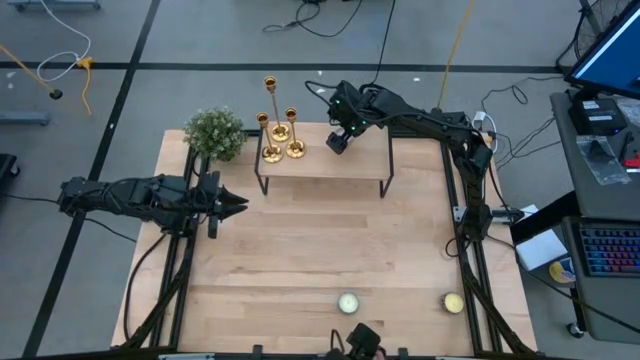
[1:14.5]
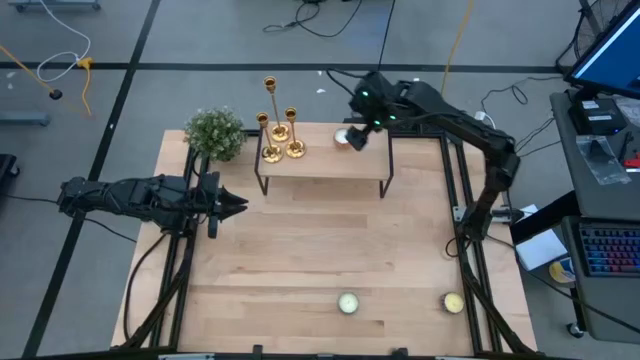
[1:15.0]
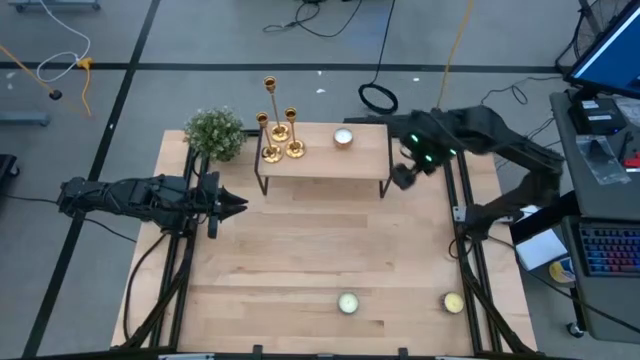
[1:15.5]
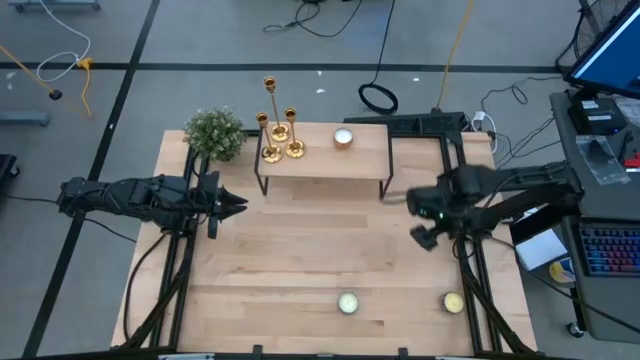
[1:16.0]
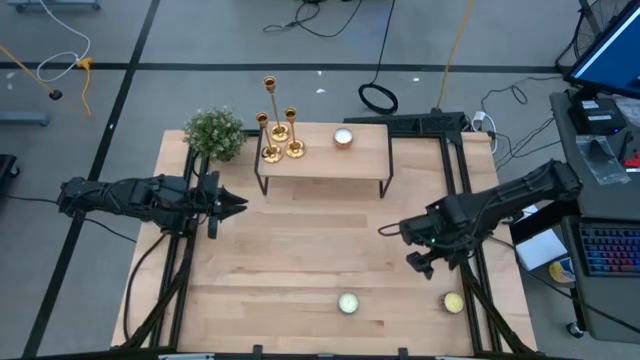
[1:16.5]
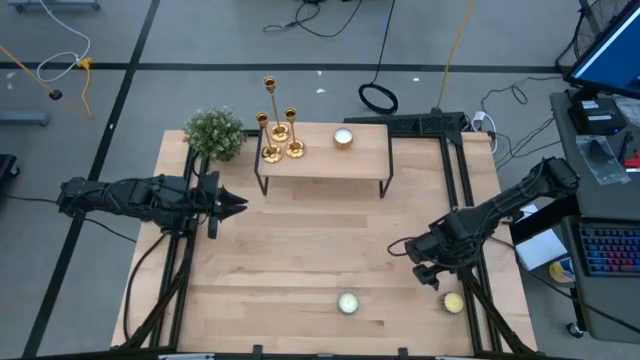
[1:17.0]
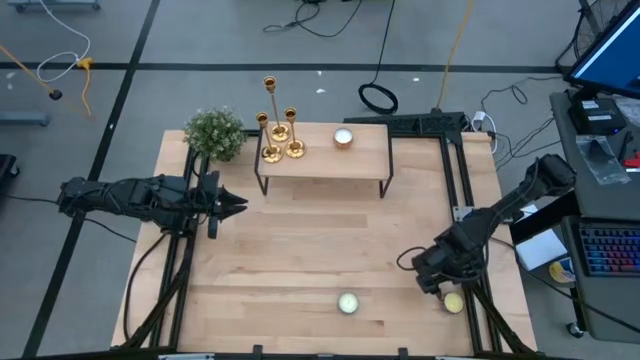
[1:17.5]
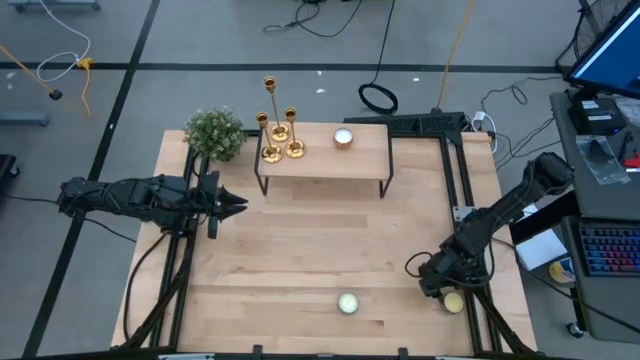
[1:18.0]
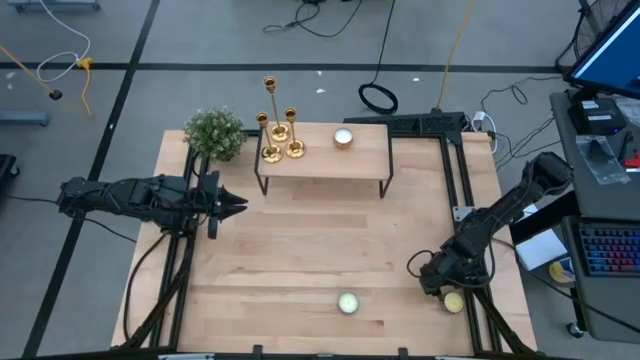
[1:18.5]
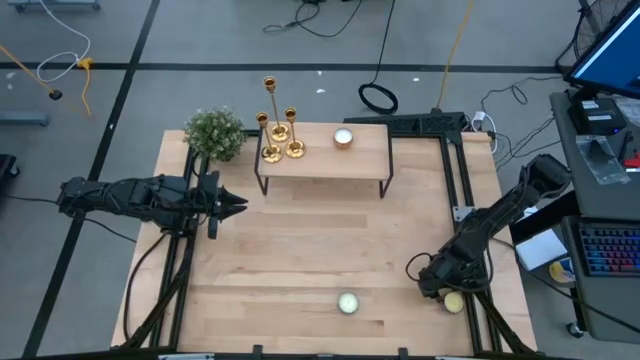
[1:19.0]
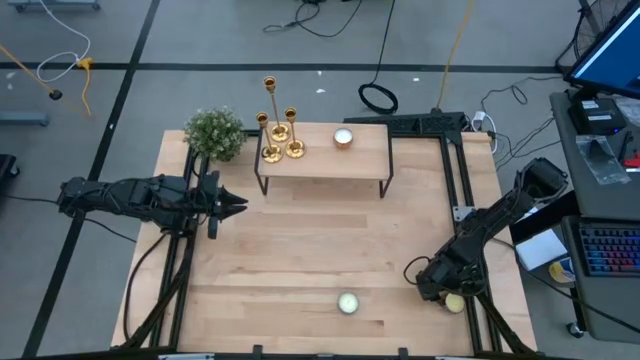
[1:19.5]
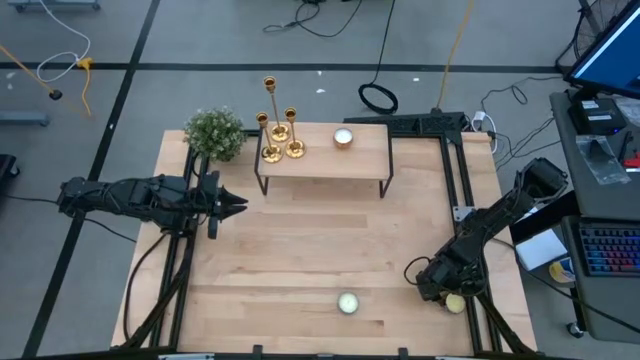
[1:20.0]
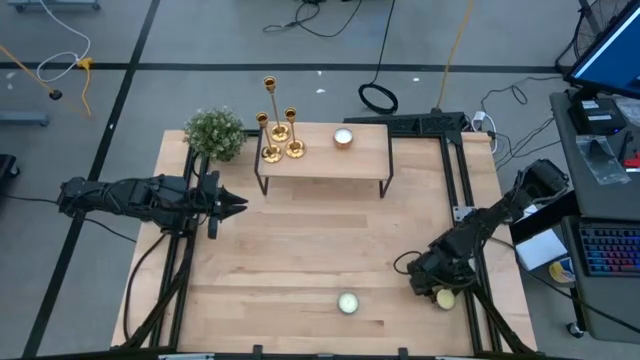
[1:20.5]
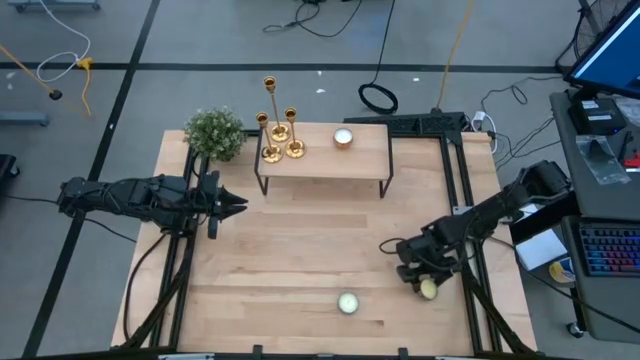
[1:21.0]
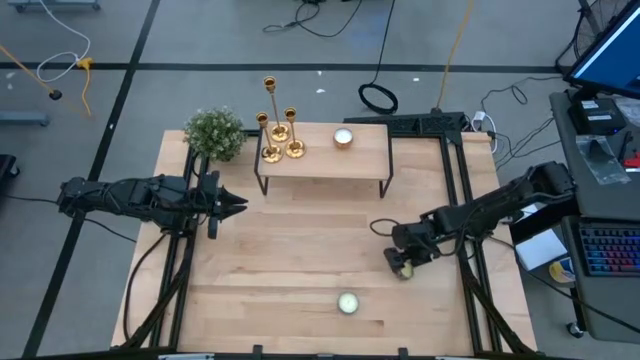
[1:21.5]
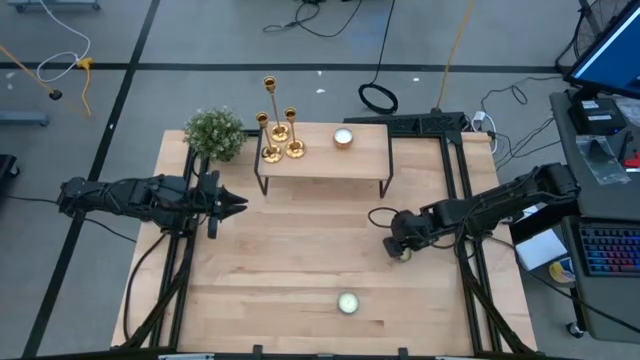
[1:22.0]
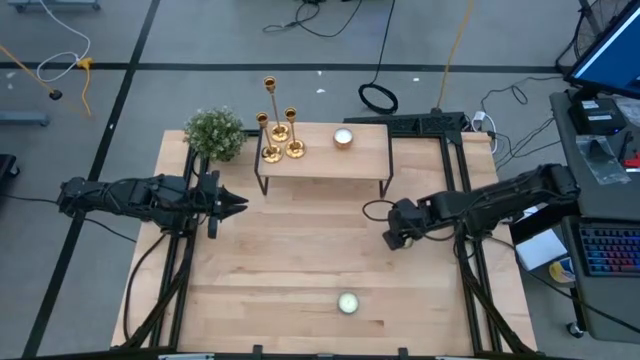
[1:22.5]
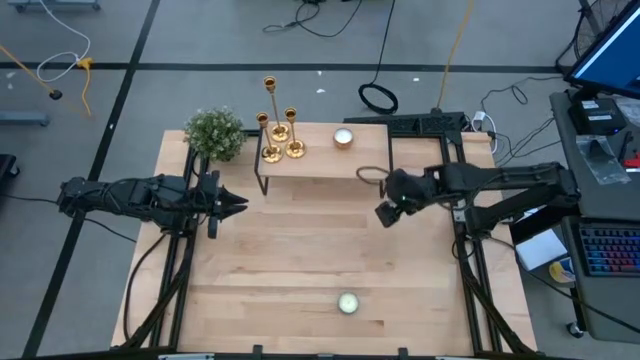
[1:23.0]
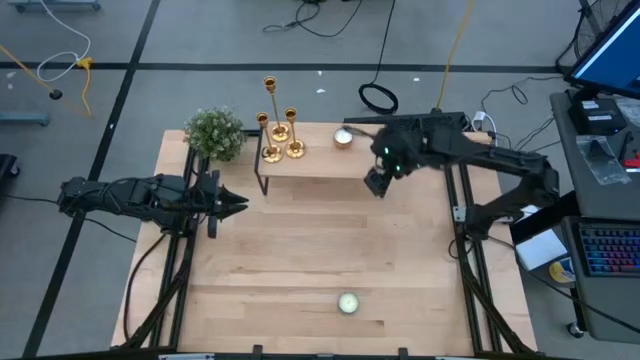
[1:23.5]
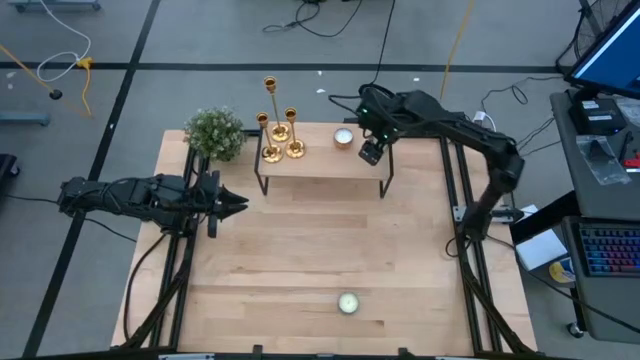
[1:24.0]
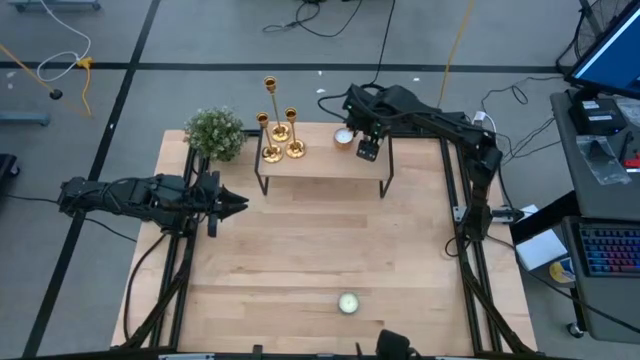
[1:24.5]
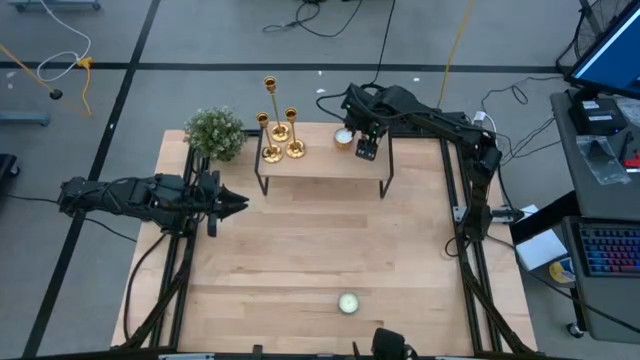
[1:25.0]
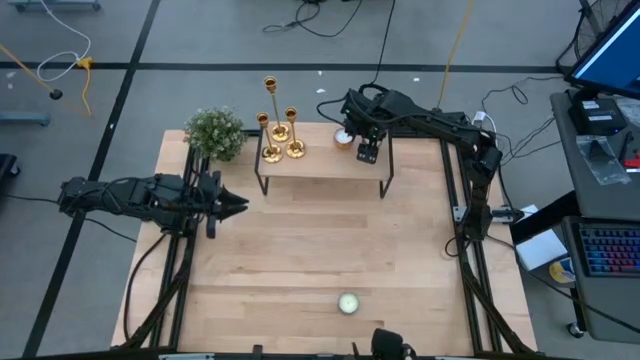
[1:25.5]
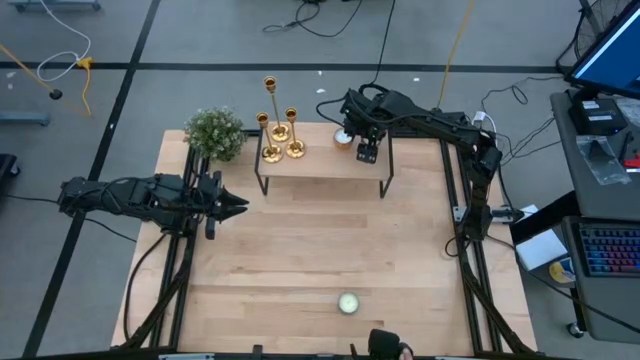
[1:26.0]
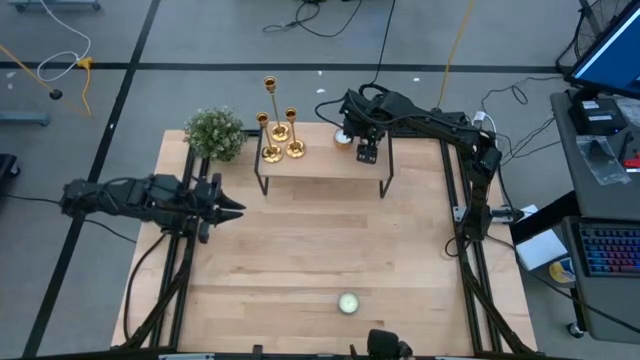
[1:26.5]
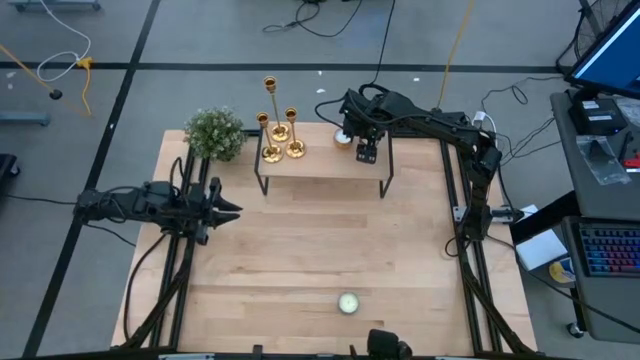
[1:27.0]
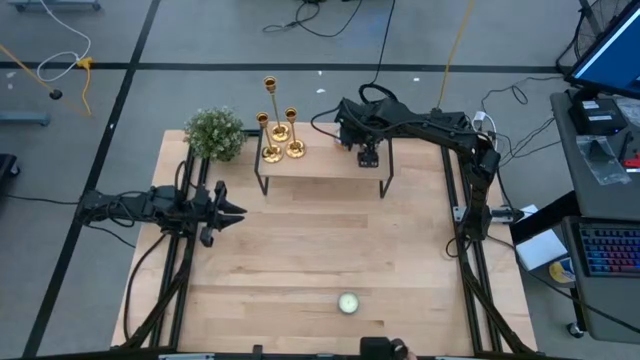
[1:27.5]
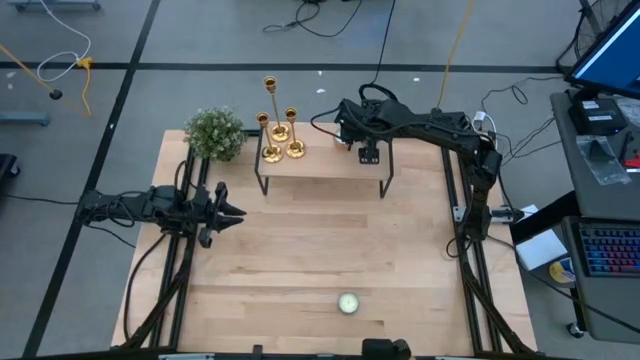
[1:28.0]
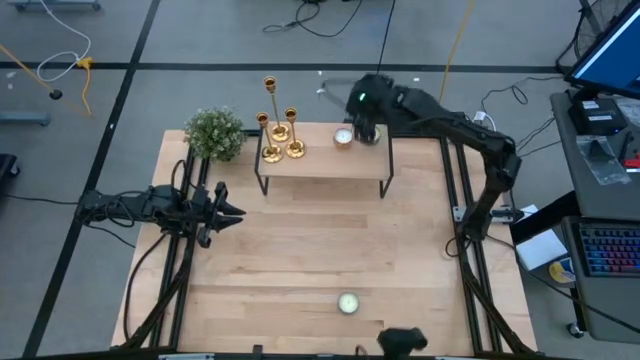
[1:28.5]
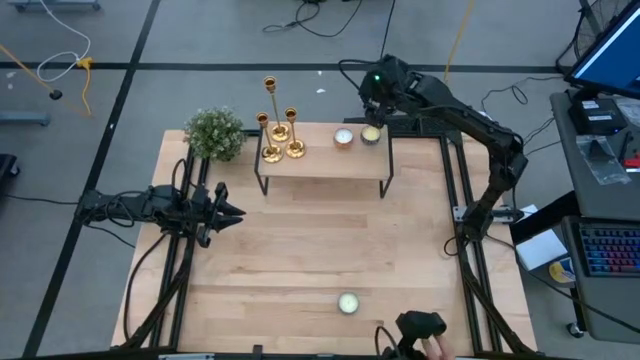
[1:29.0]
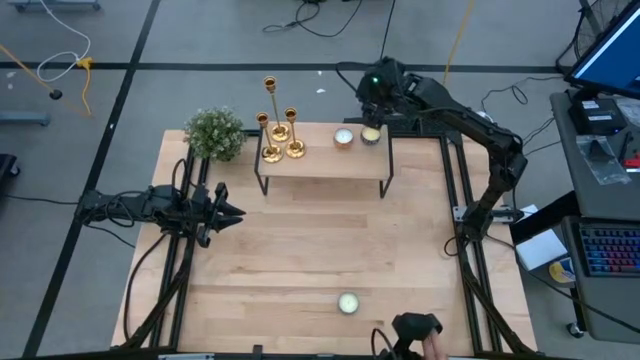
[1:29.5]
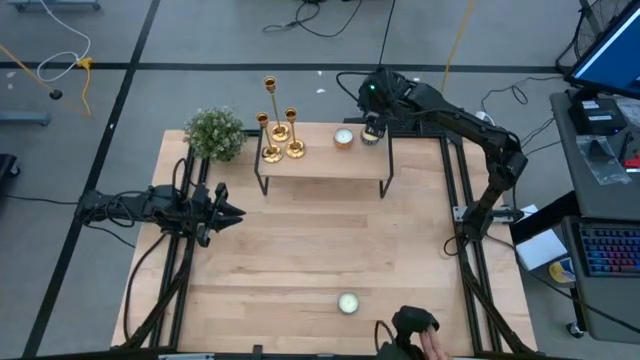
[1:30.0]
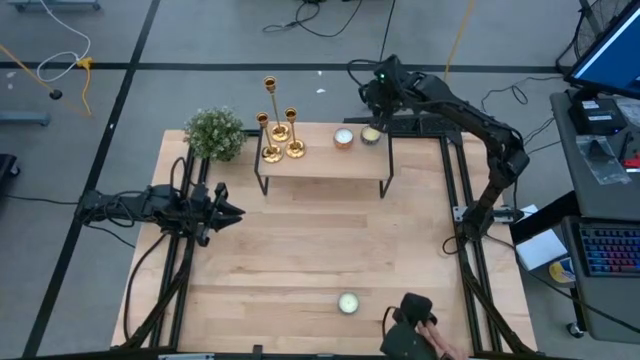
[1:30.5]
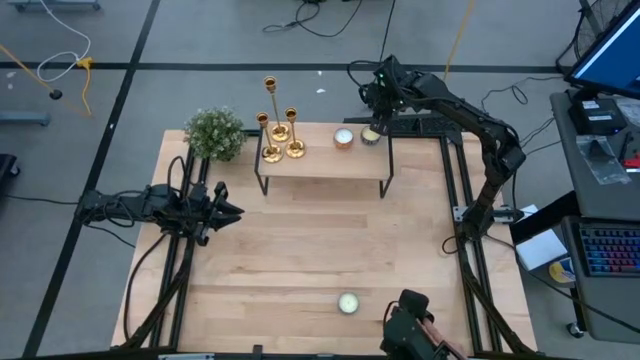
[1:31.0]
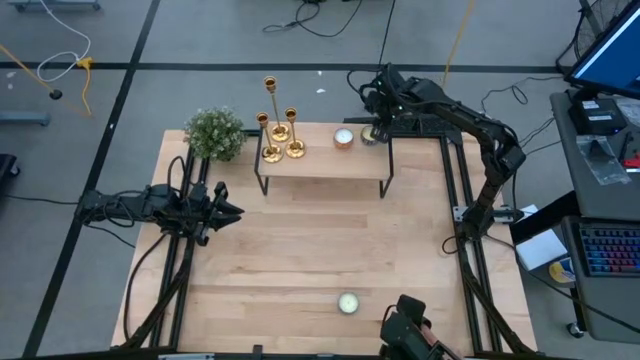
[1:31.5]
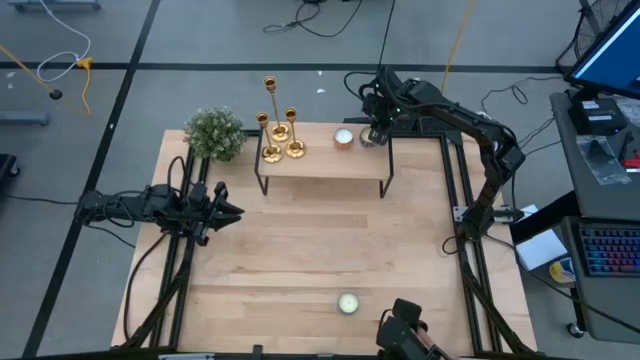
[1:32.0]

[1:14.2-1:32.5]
Task: Pick & Place candle stick holders
Put the black scented candle on the shelf
